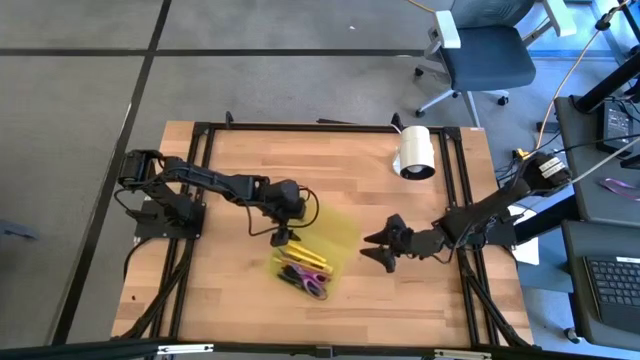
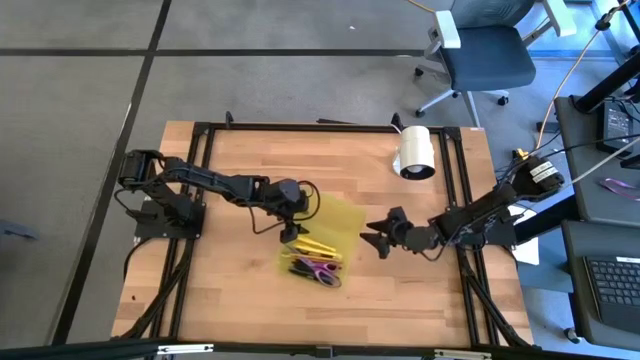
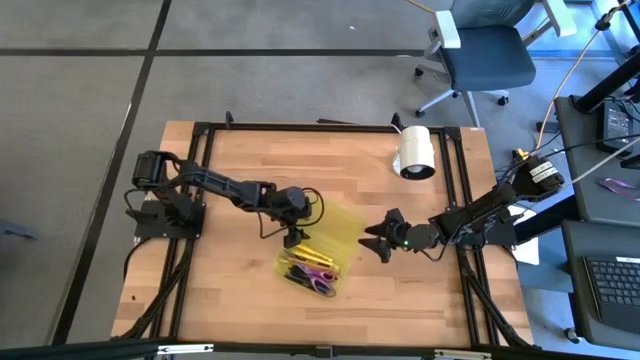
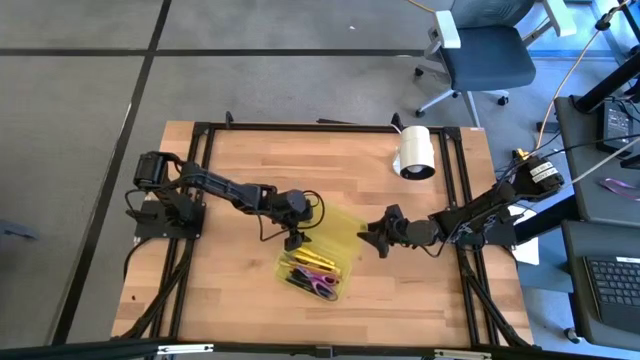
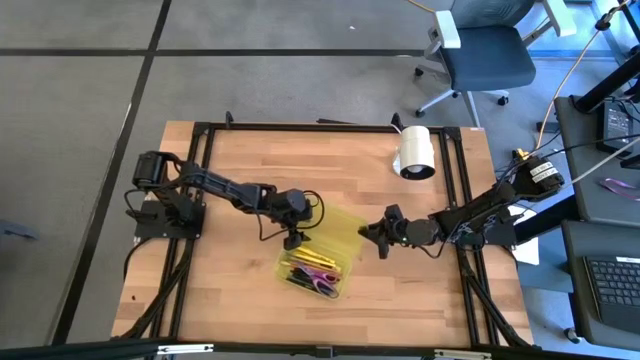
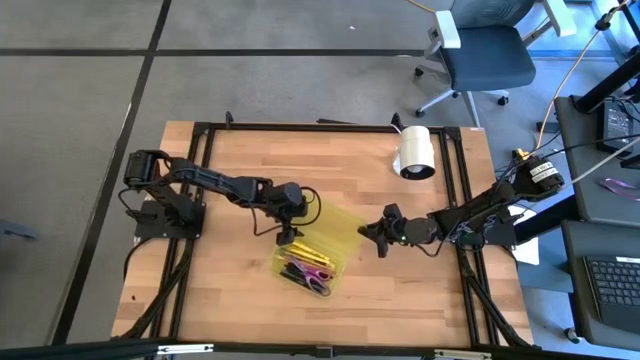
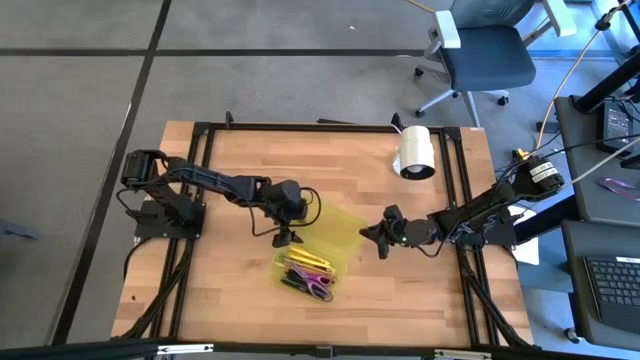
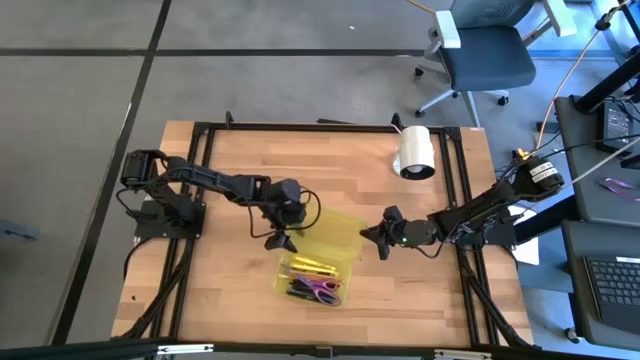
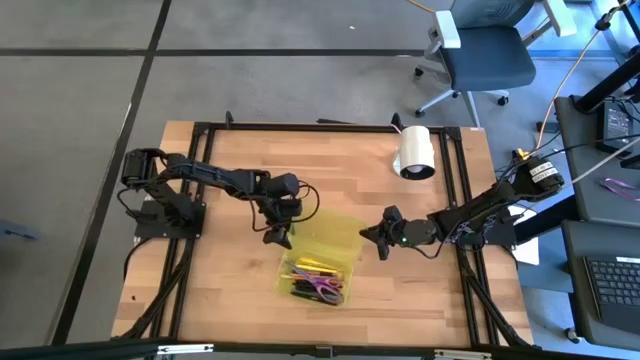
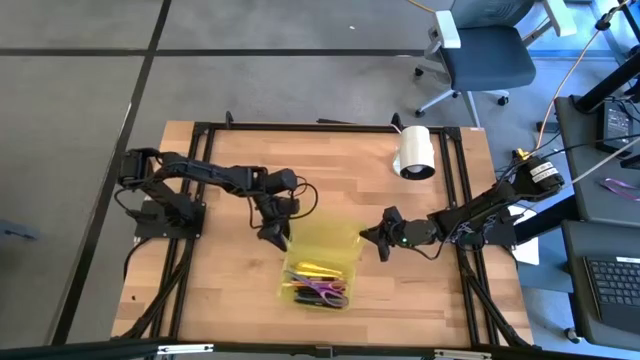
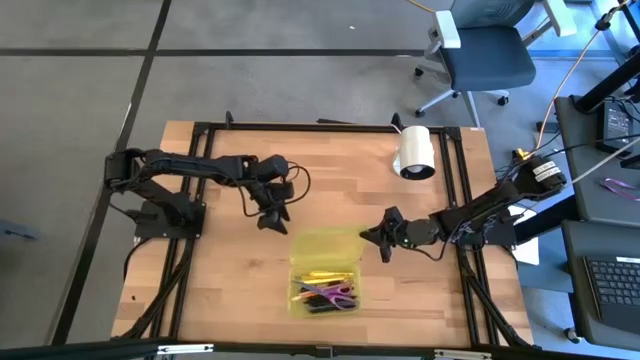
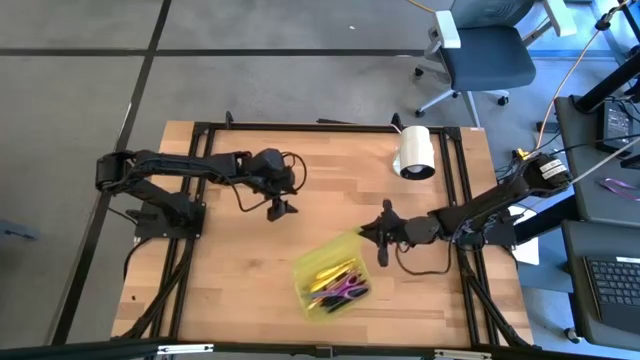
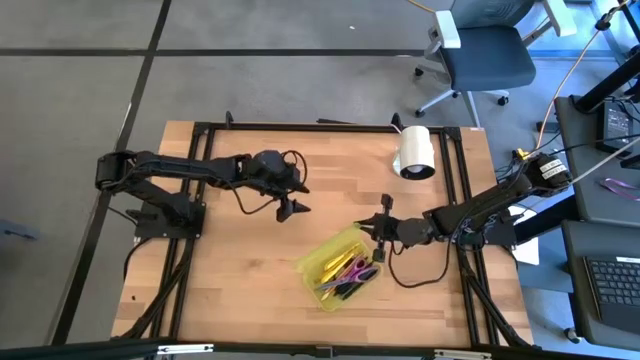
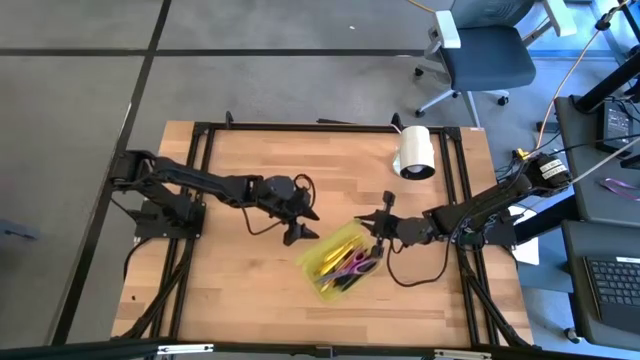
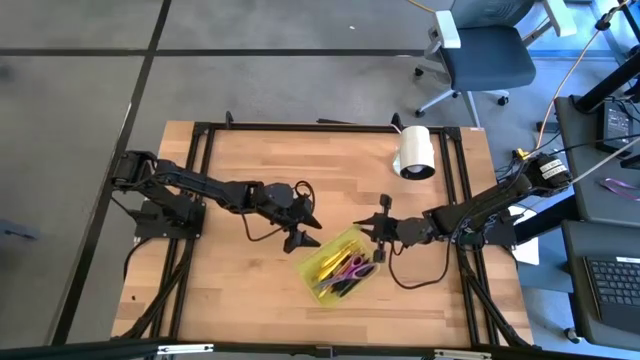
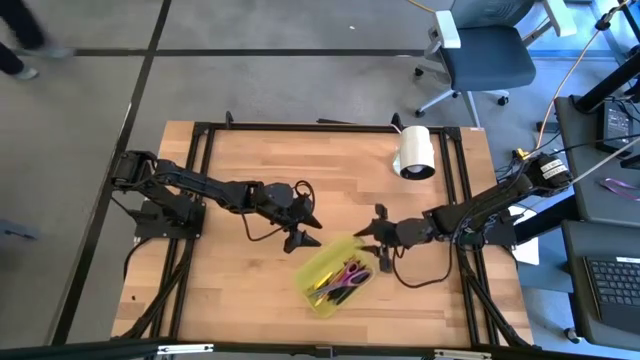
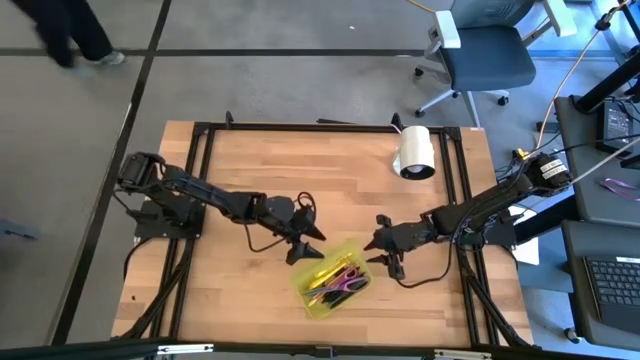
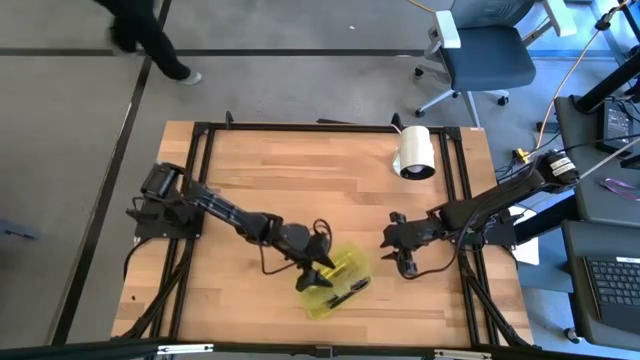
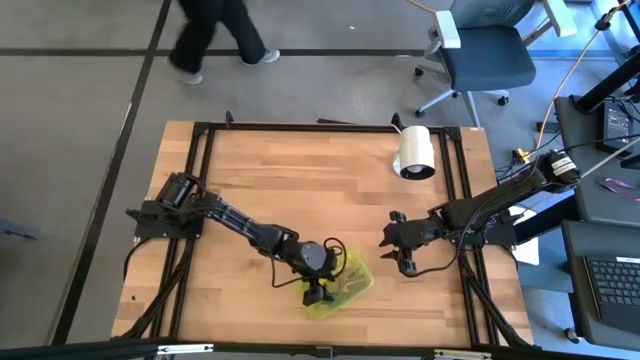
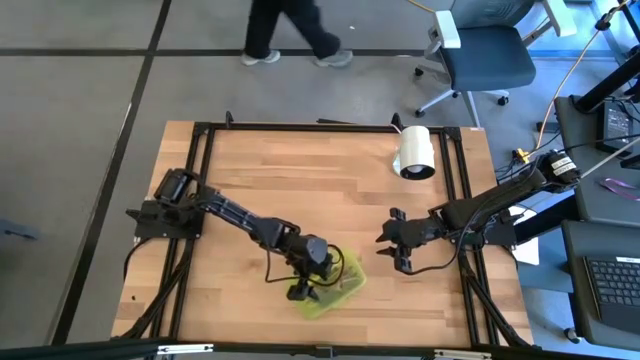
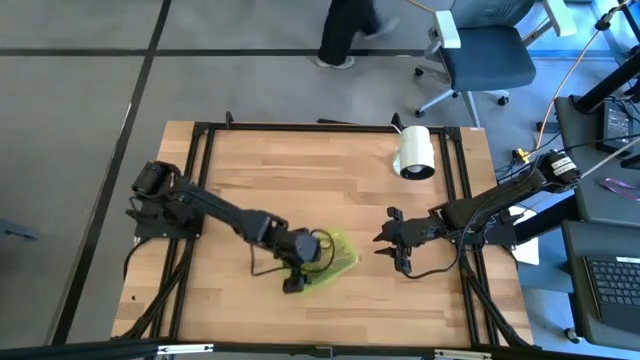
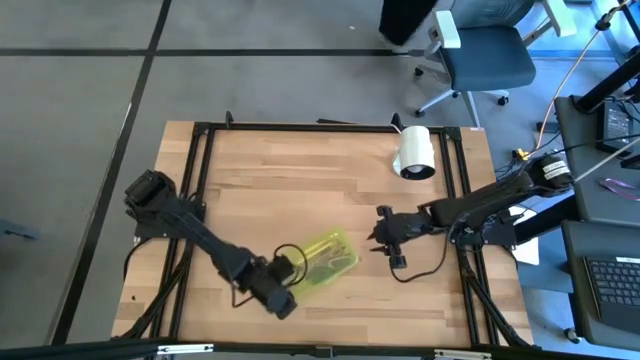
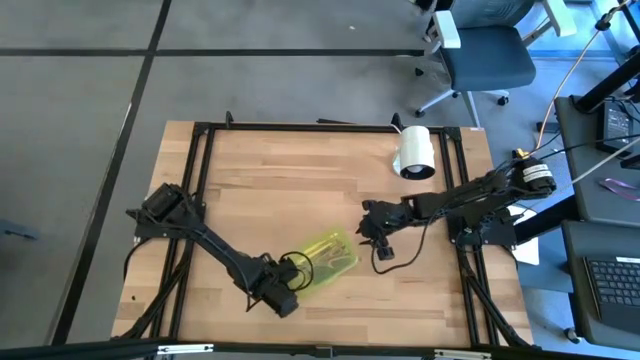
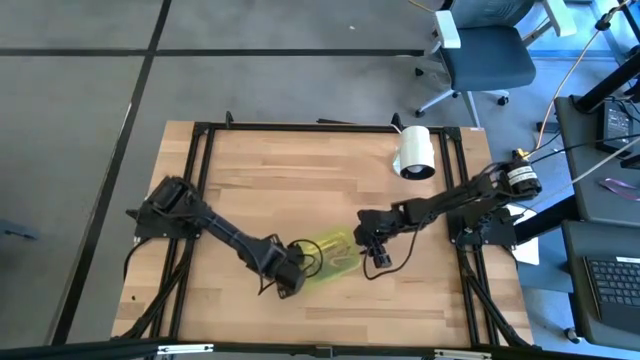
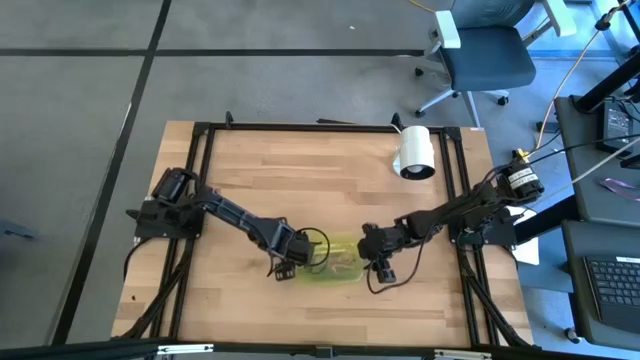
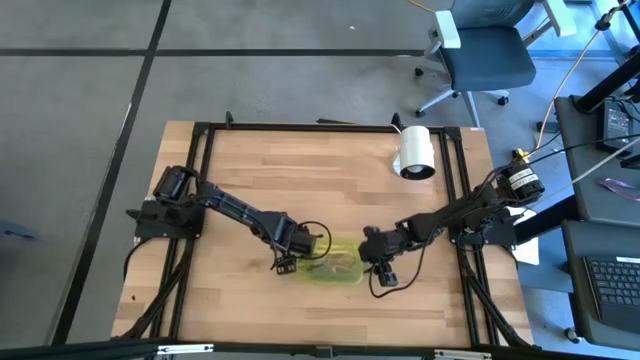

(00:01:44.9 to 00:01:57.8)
Task: Pick & place school supplies into a supply box
Close the yellow supply box

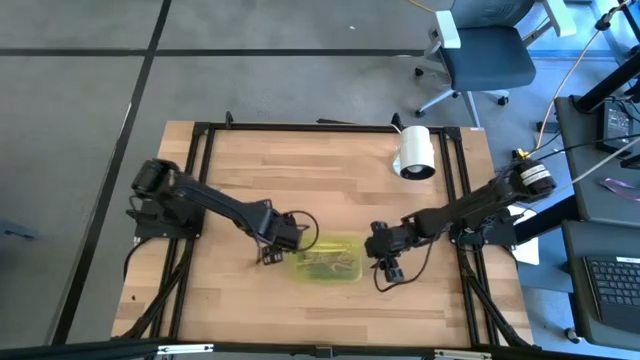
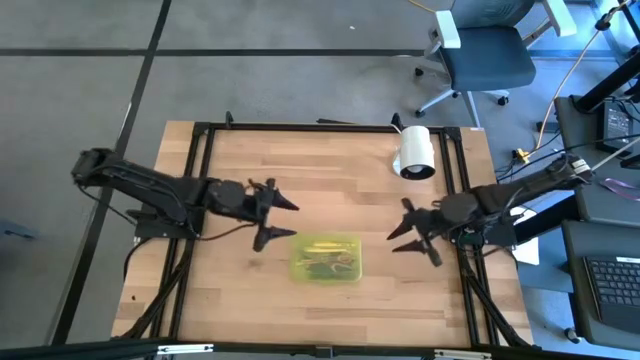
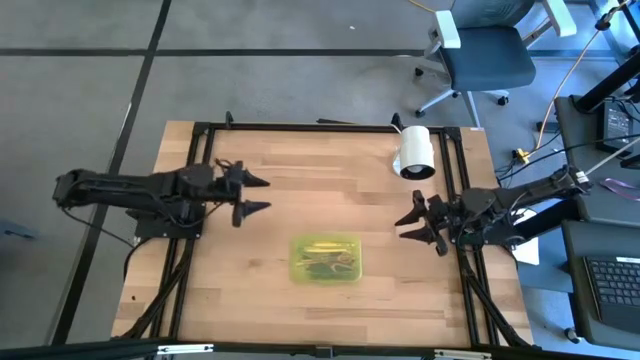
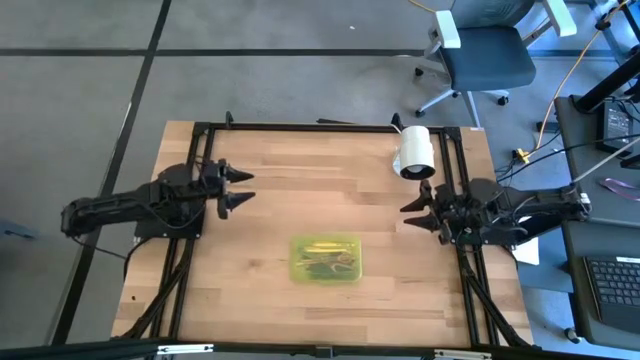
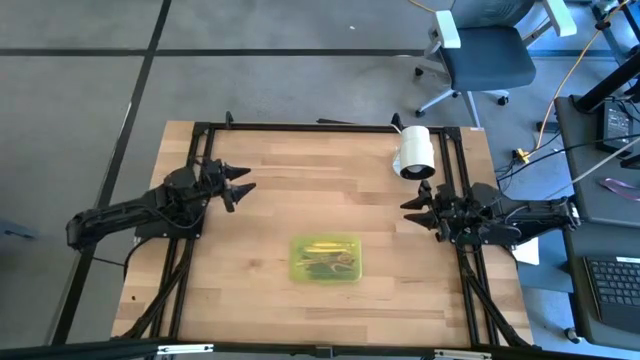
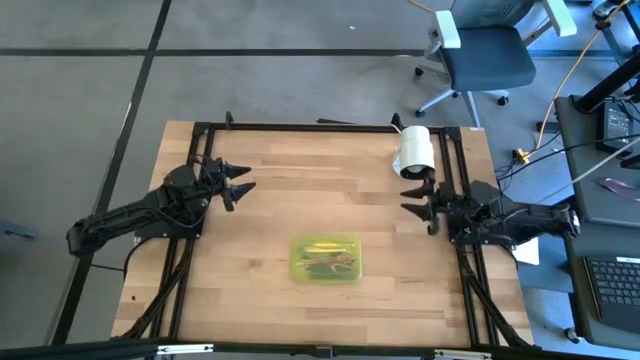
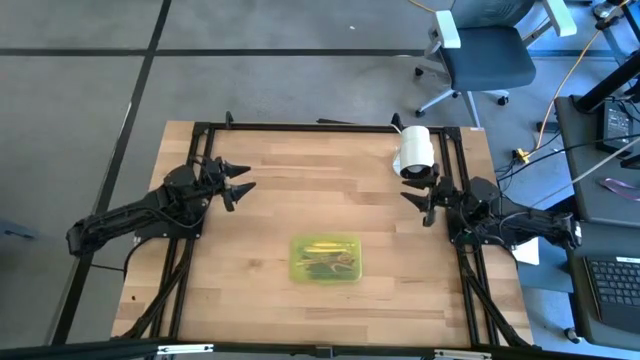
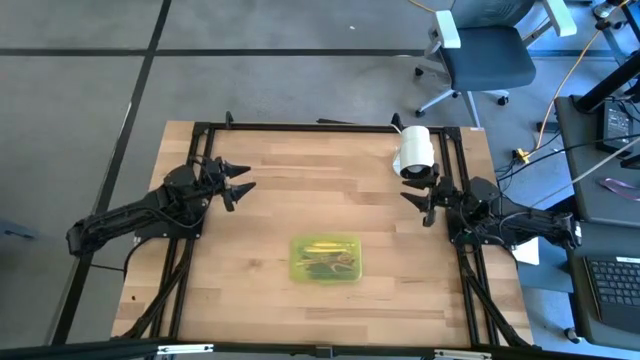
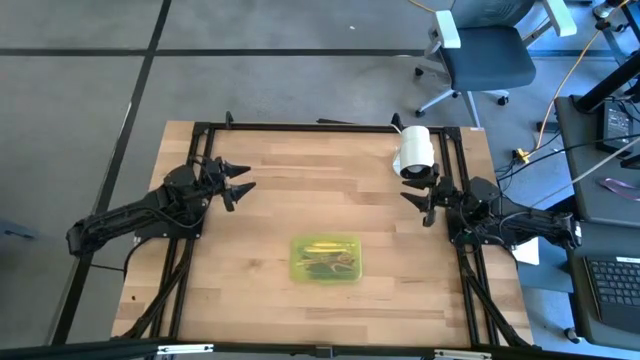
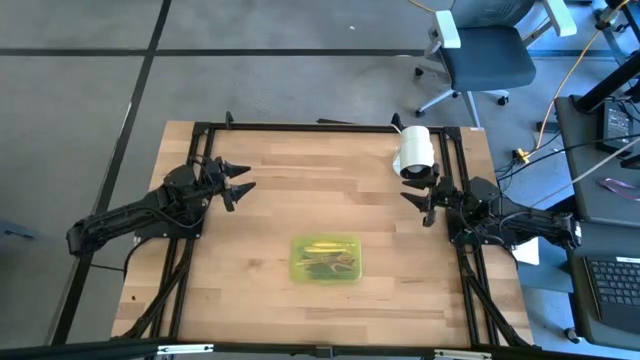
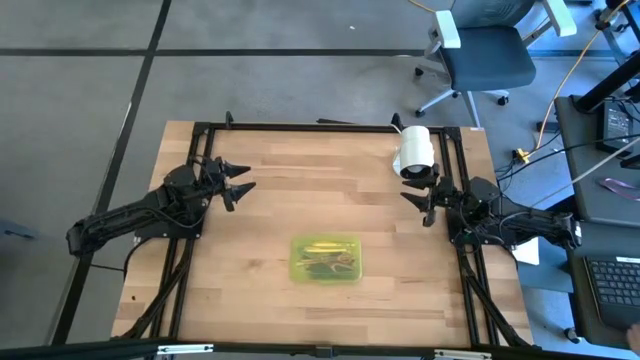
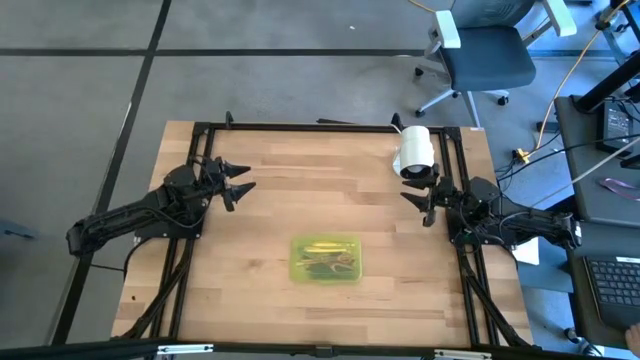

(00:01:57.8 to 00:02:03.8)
Return to Home Position

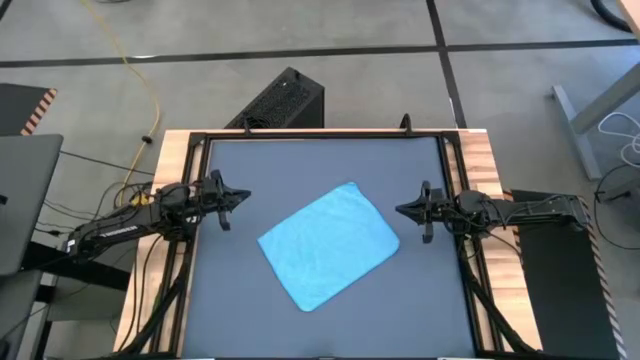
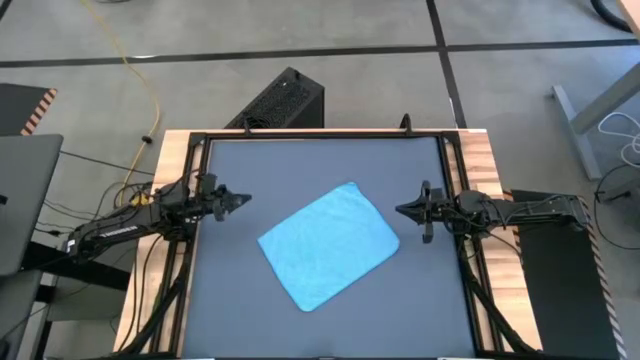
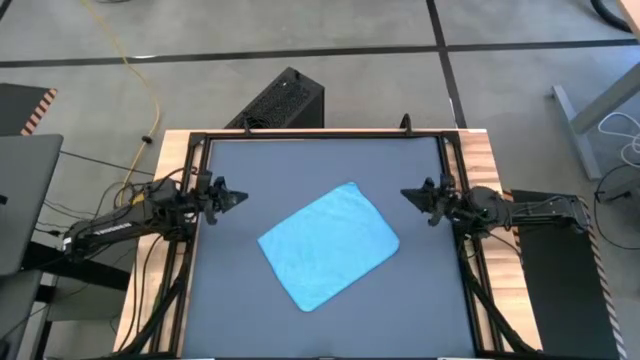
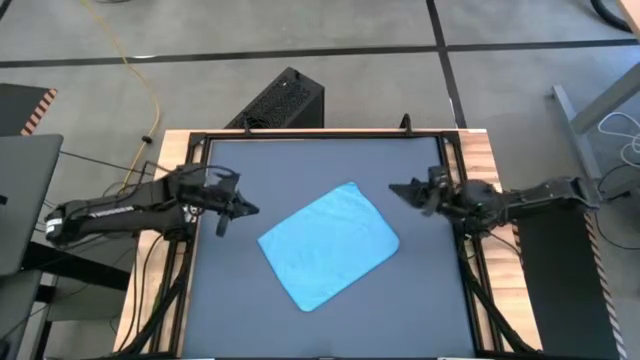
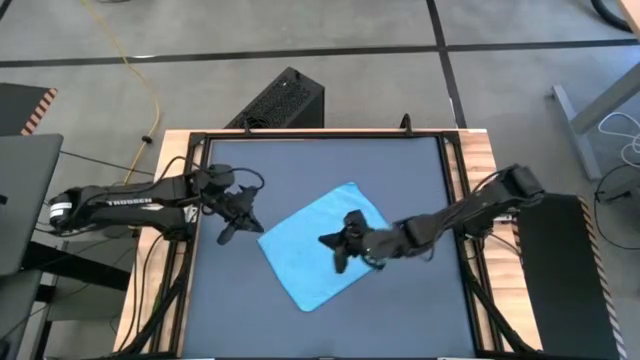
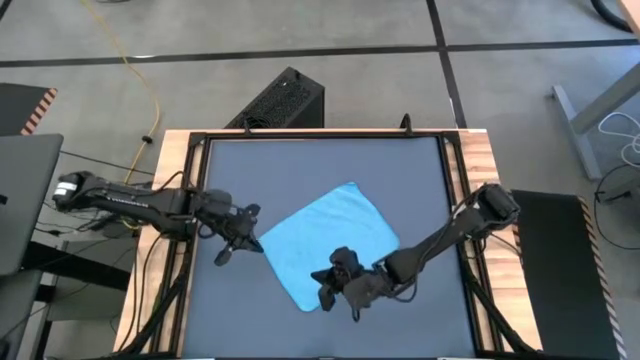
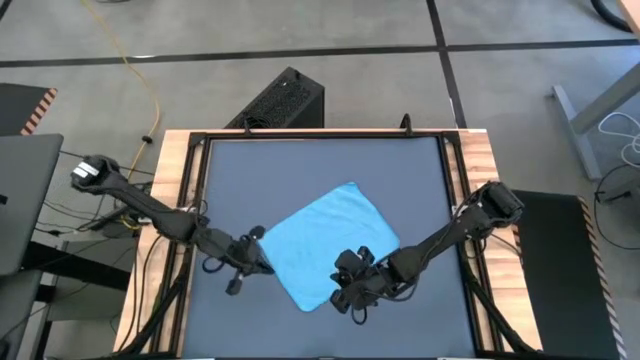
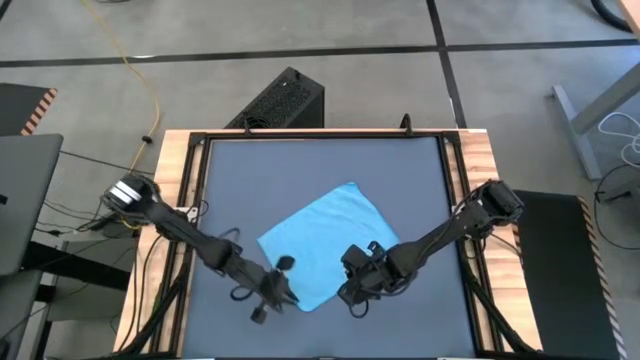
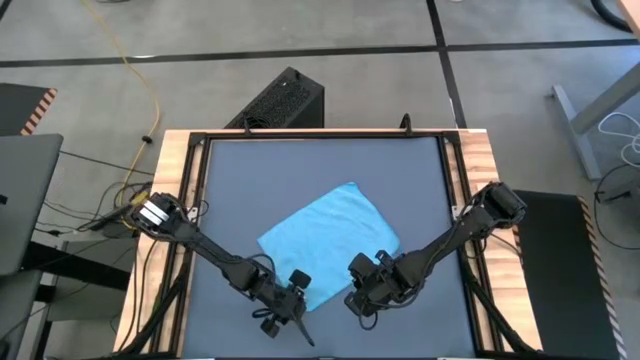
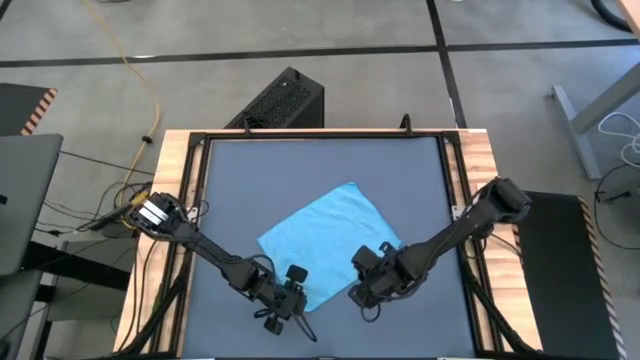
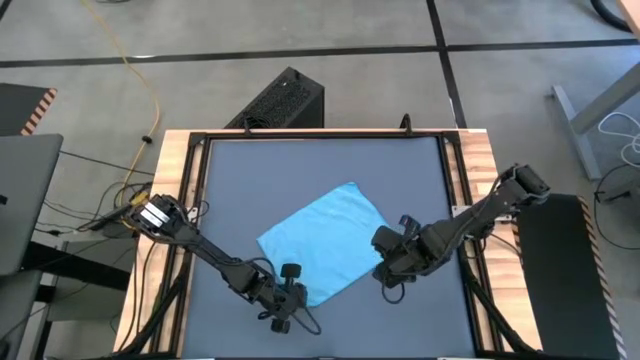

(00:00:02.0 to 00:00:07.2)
Task: Roll towel
Fold the blue towel
